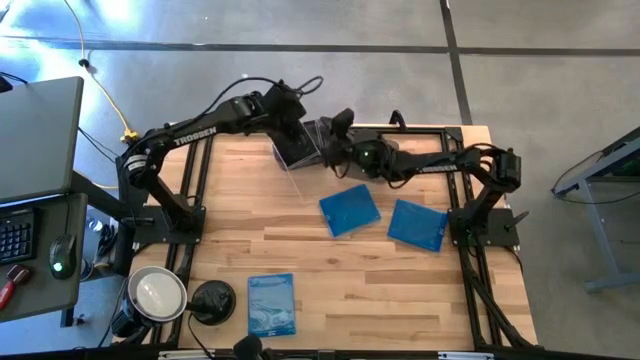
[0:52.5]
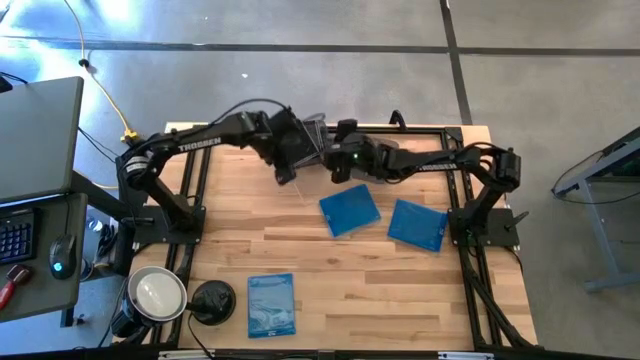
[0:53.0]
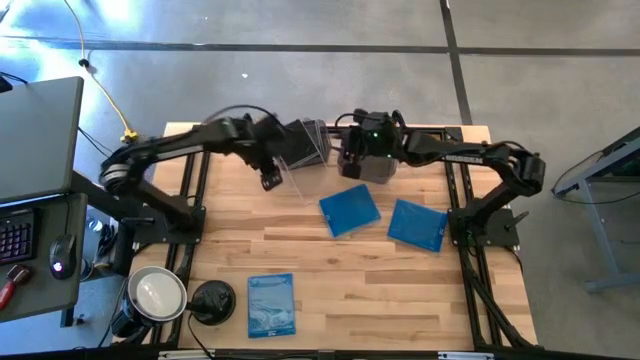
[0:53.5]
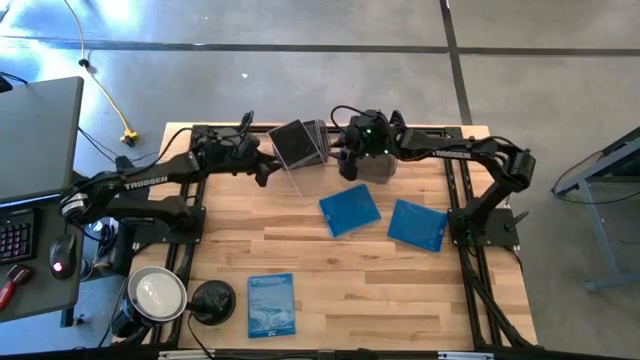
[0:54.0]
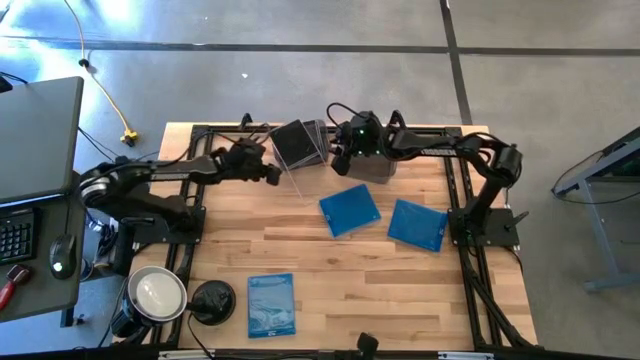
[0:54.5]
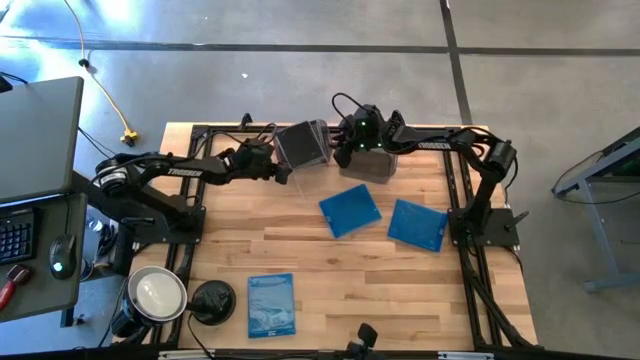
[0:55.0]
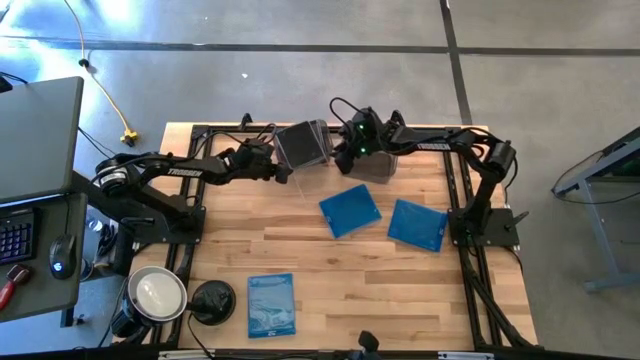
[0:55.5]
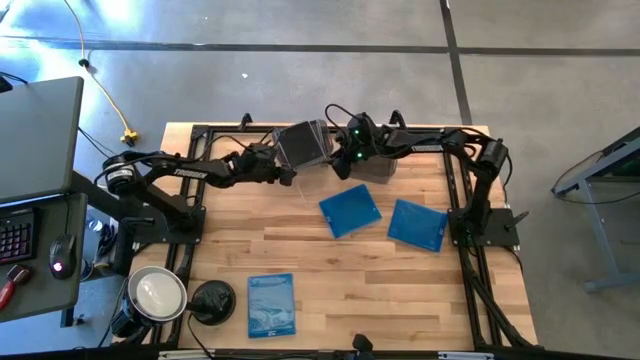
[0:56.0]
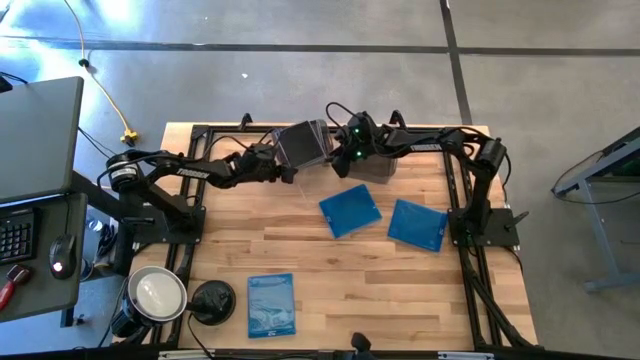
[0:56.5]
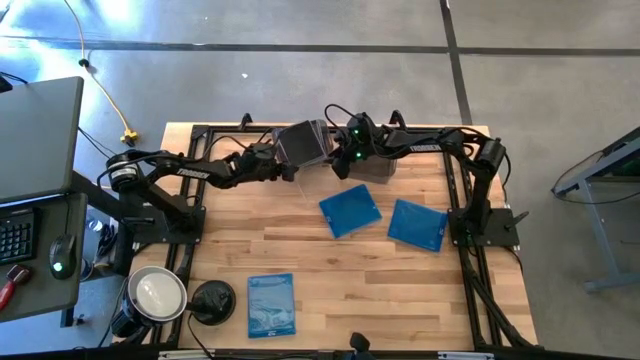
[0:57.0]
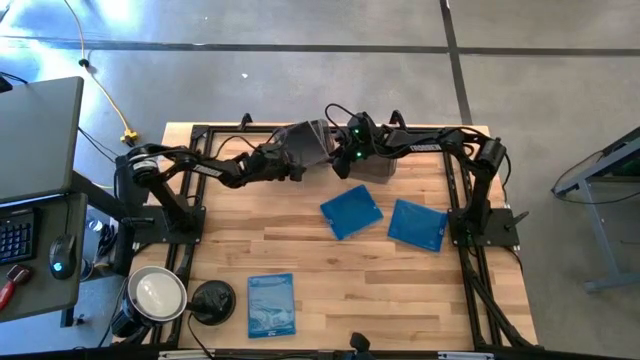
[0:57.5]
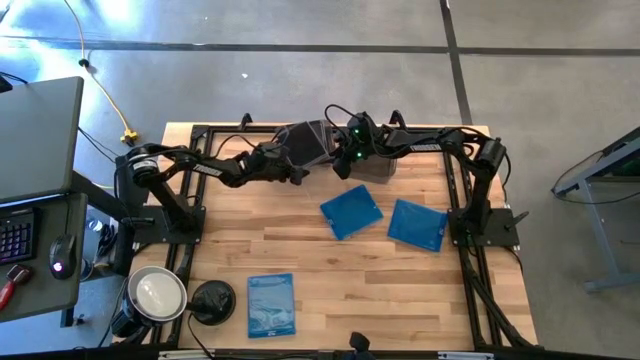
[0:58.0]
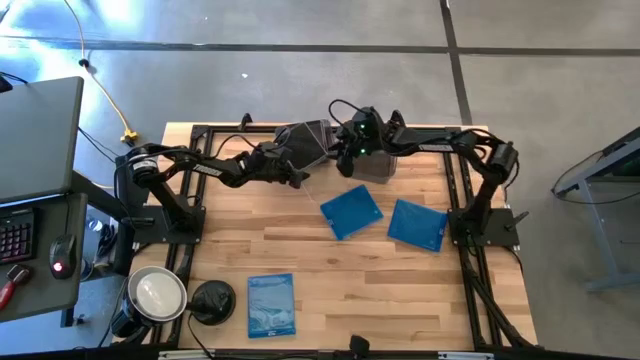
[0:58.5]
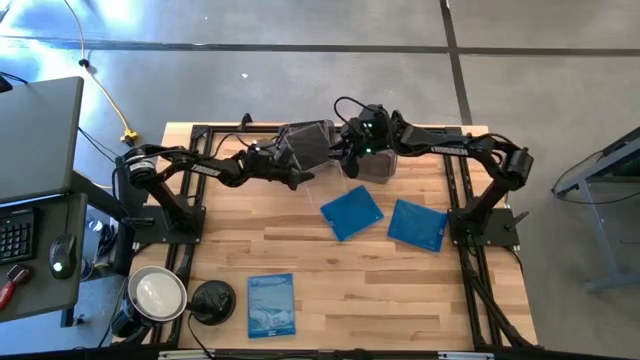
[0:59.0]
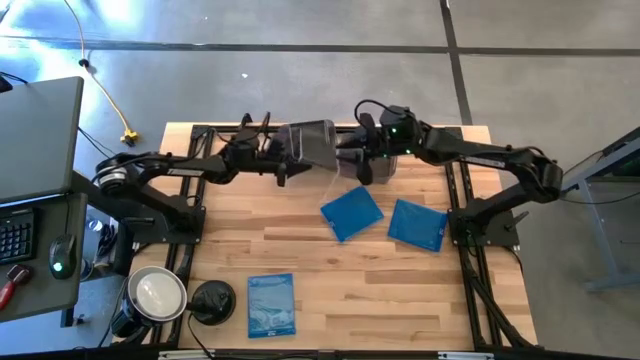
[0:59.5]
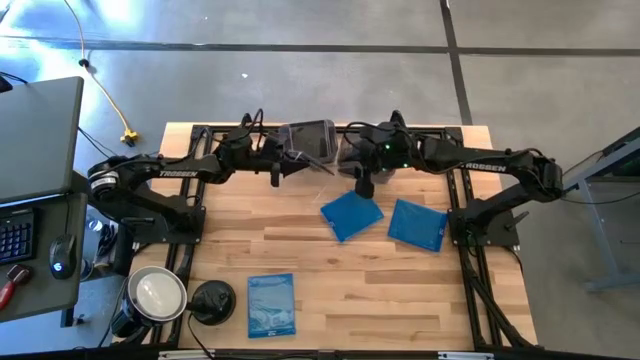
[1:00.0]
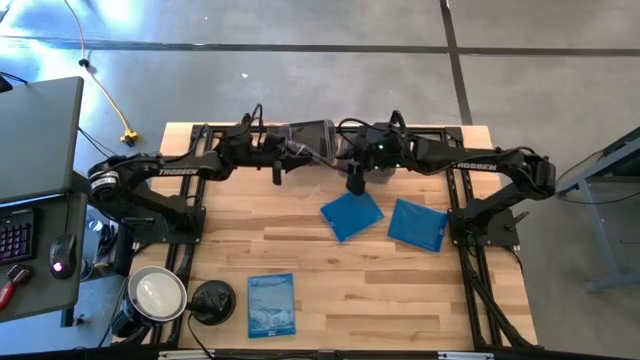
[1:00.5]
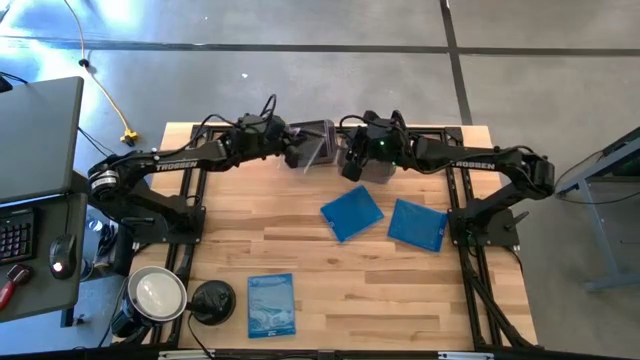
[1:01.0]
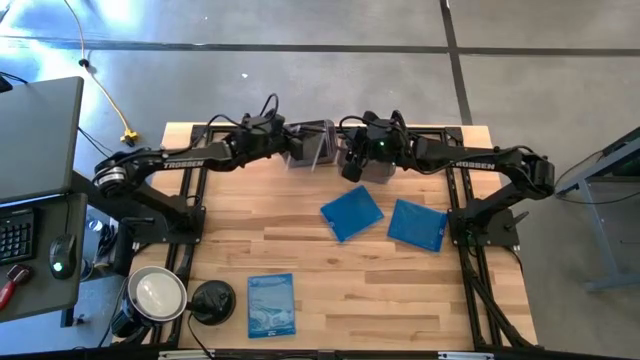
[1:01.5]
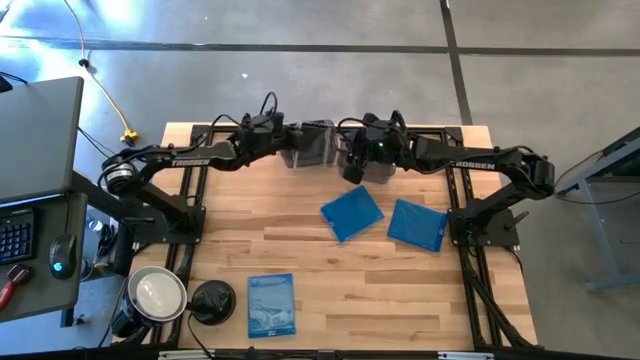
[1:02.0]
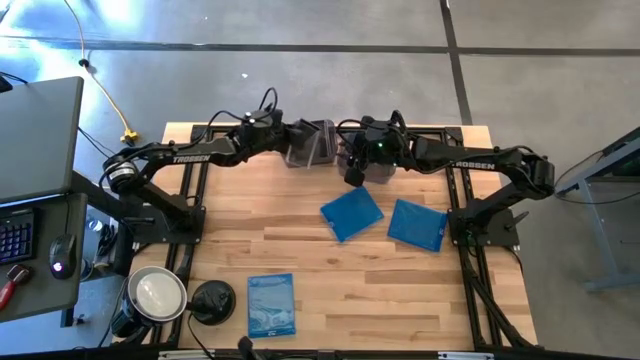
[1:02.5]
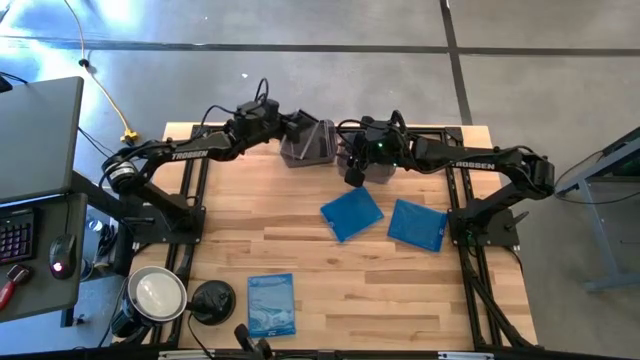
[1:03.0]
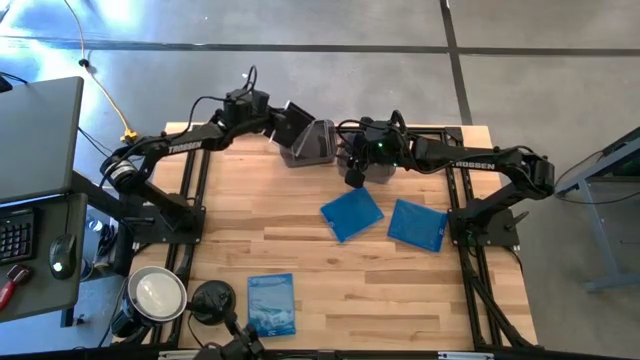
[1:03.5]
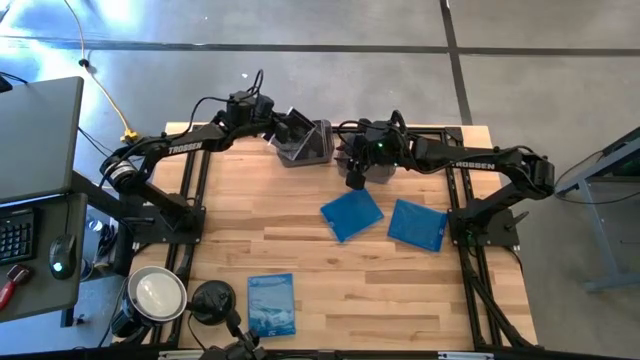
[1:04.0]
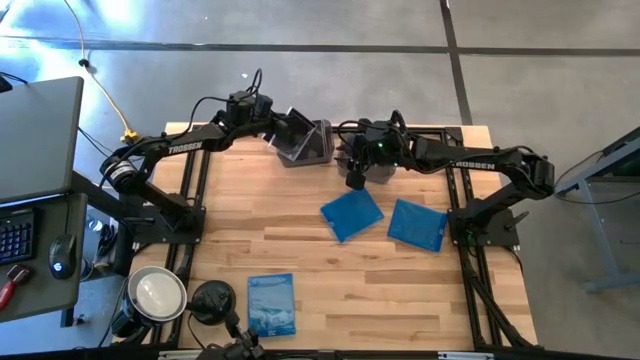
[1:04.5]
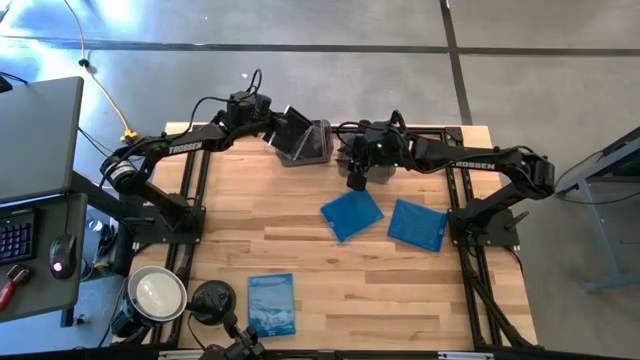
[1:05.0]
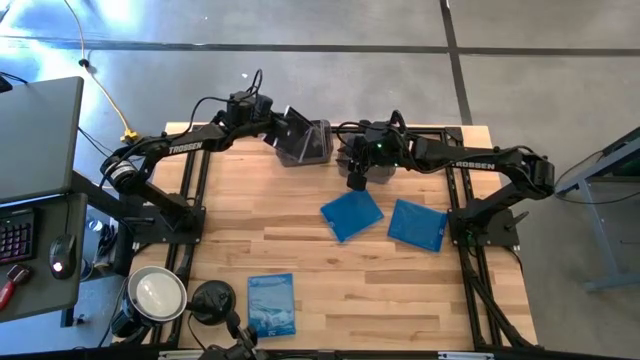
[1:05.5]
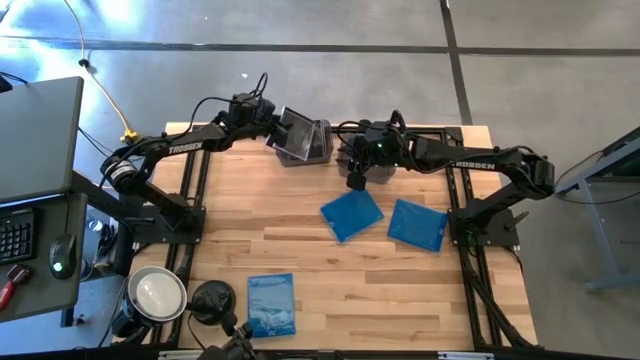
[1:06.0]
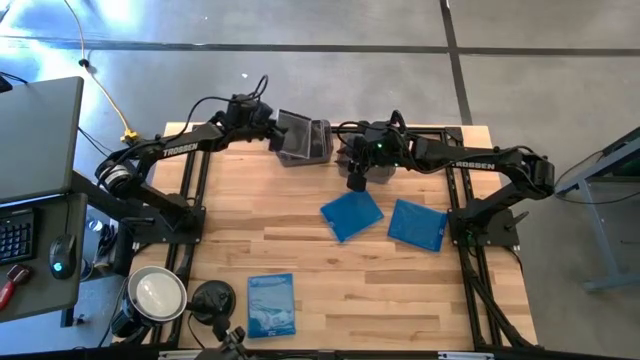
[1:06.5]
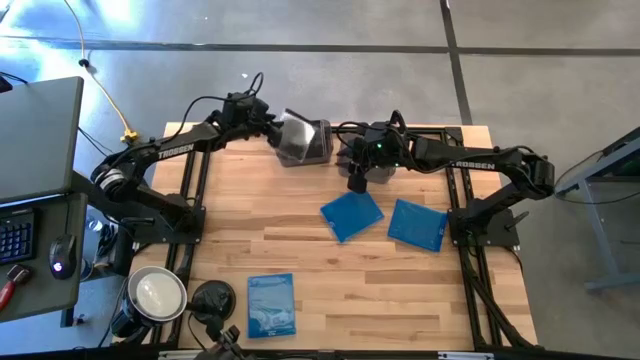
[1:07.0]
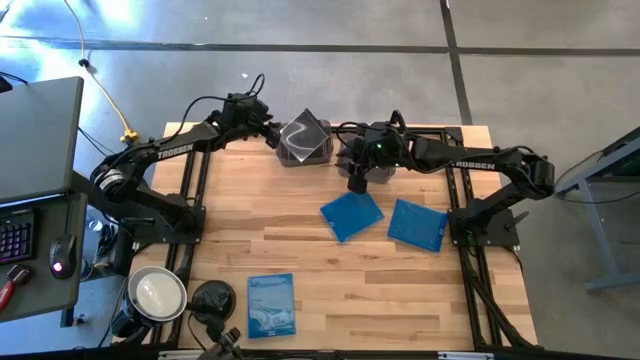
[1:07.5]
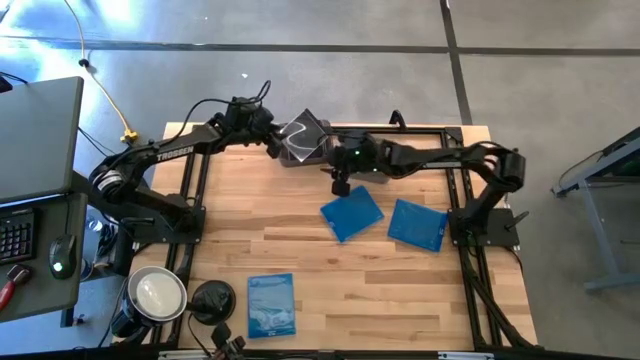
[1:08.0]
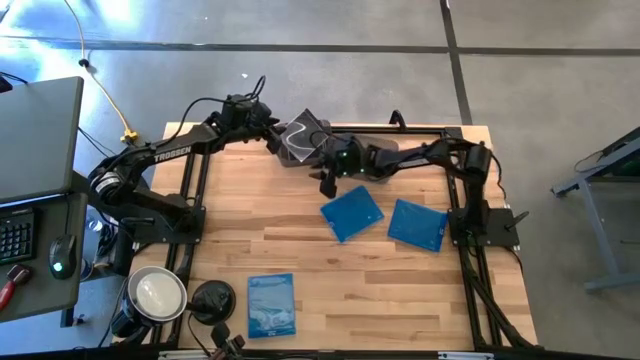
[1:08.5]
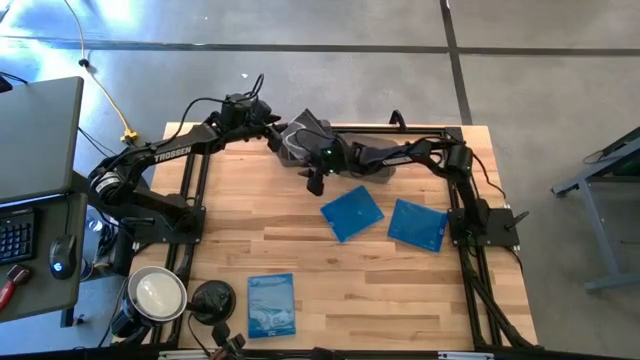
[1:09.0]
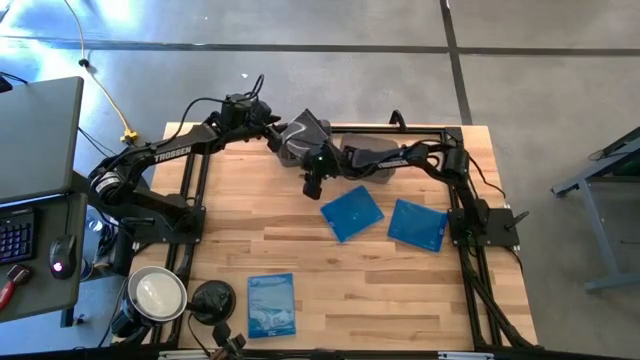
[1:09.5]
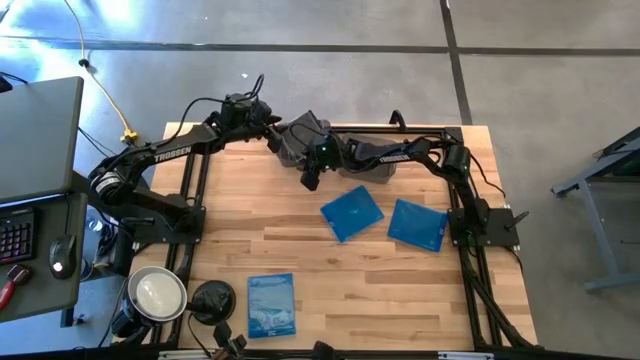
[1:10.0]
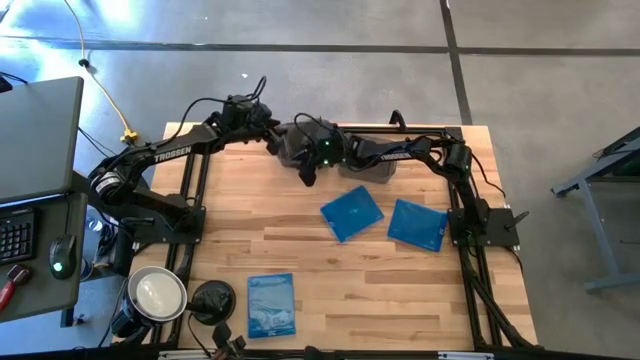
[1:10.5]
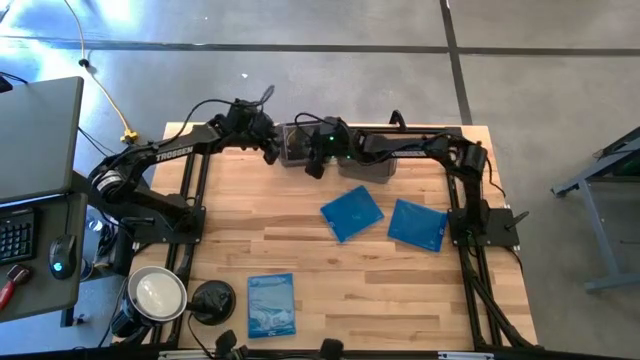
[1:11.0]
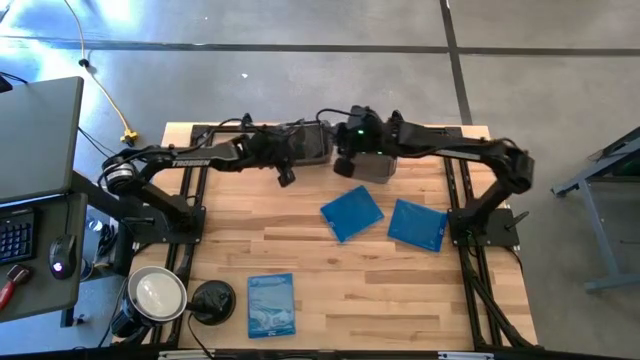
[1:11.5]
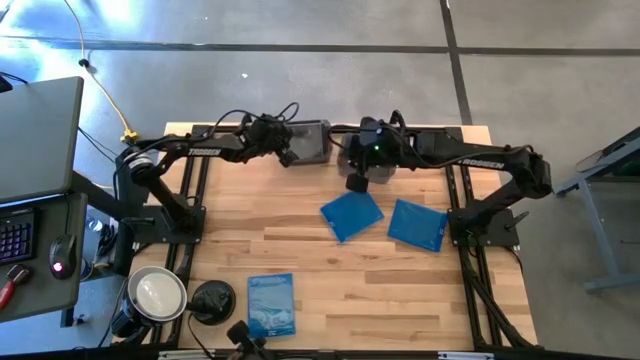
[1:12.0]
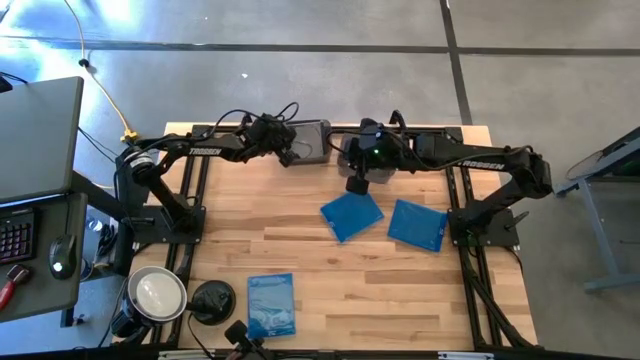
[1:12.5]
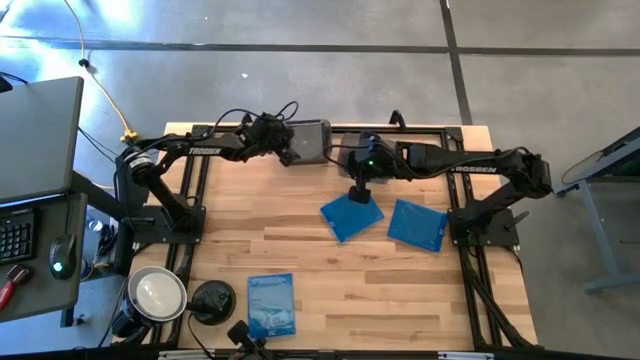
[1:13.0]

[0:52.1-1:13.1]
Task: Pick & place jewel cases by type
Put the black cd case into the left black bin
